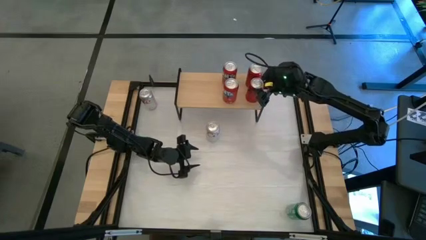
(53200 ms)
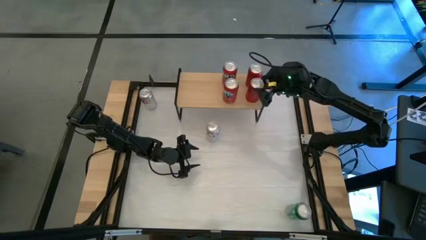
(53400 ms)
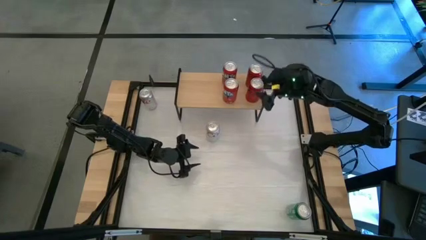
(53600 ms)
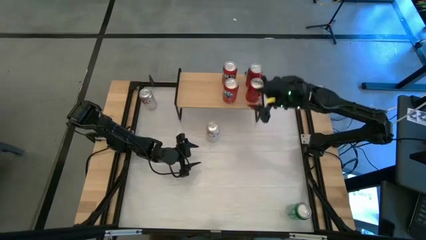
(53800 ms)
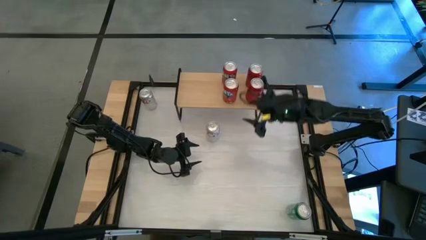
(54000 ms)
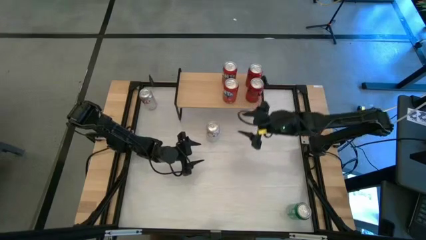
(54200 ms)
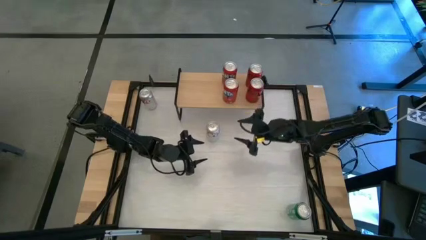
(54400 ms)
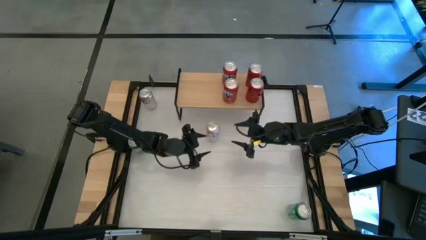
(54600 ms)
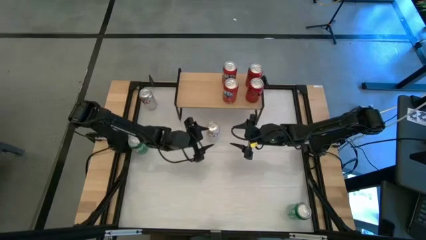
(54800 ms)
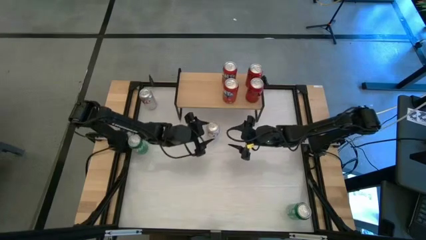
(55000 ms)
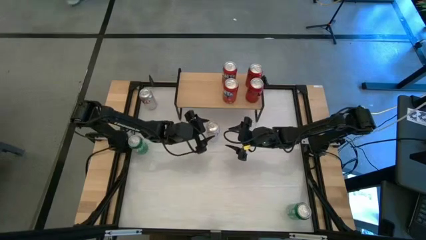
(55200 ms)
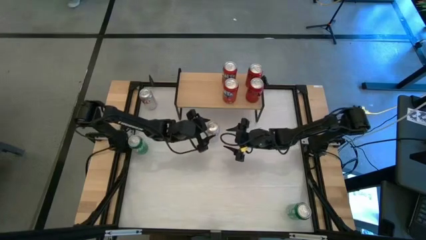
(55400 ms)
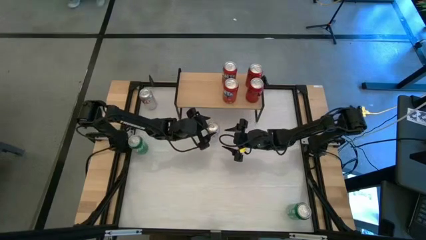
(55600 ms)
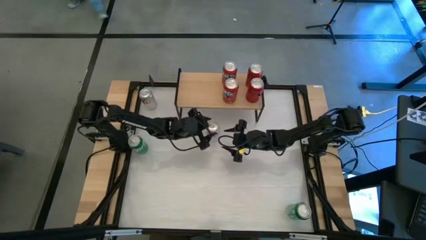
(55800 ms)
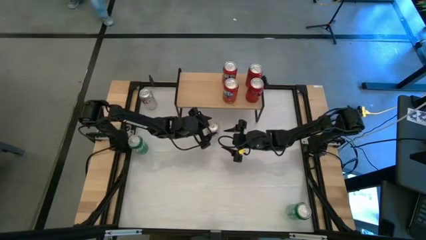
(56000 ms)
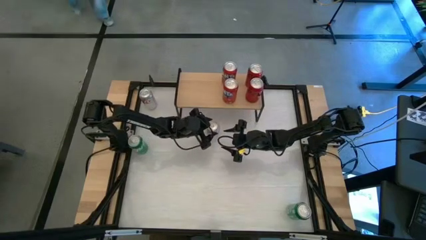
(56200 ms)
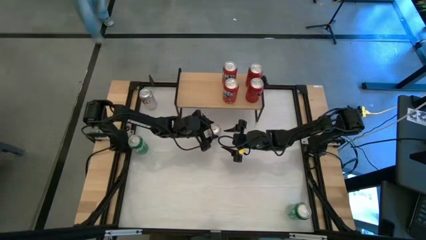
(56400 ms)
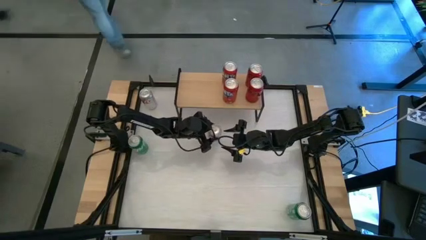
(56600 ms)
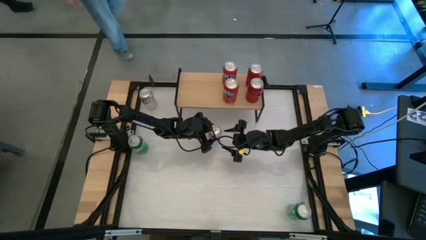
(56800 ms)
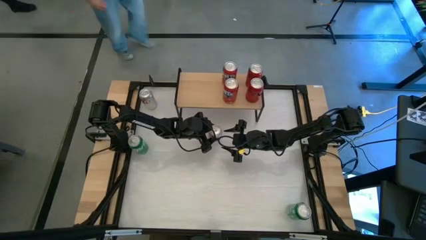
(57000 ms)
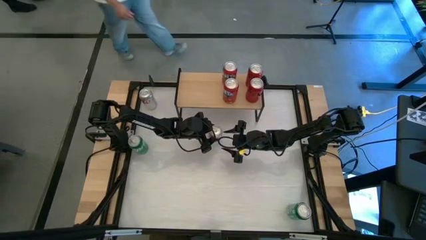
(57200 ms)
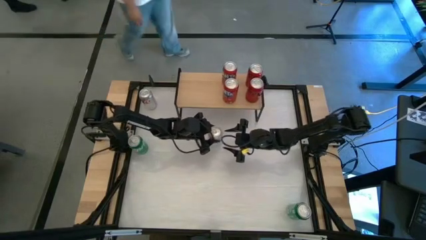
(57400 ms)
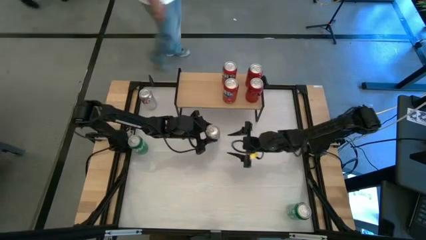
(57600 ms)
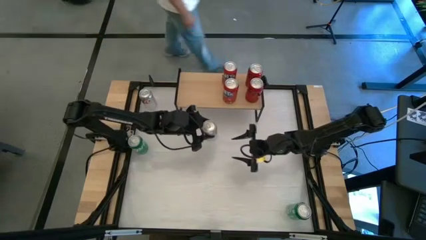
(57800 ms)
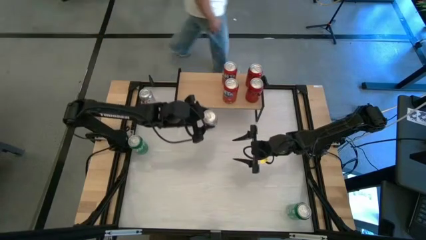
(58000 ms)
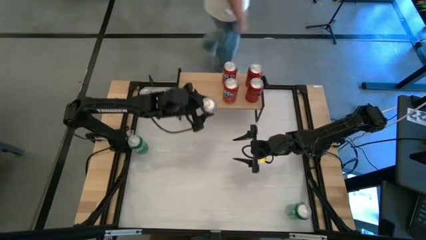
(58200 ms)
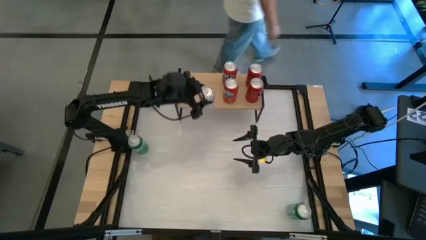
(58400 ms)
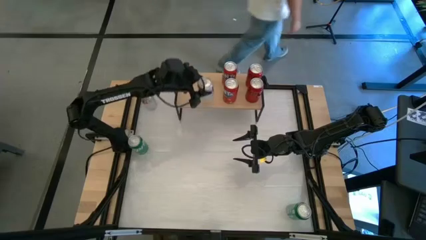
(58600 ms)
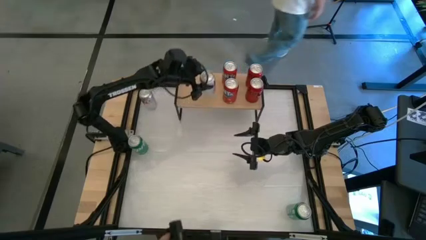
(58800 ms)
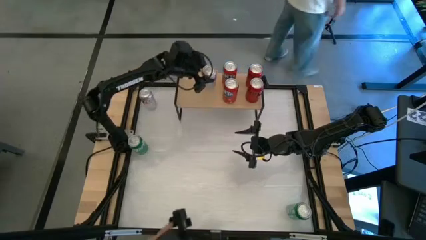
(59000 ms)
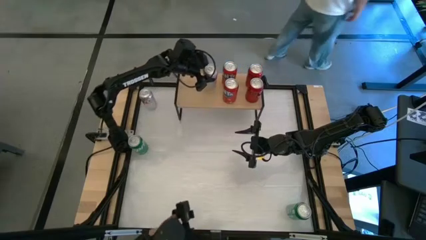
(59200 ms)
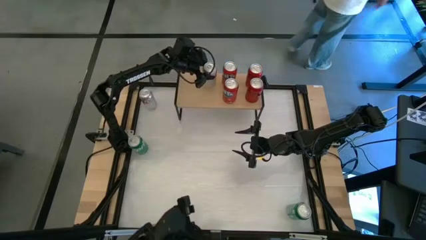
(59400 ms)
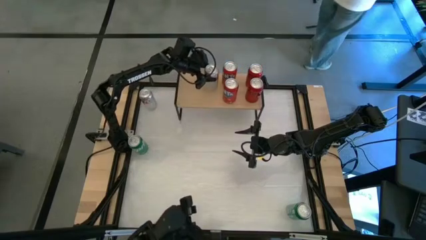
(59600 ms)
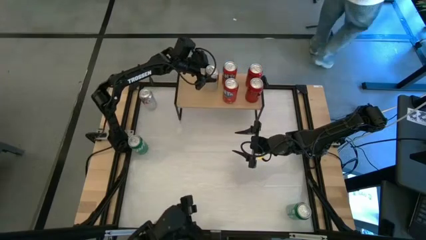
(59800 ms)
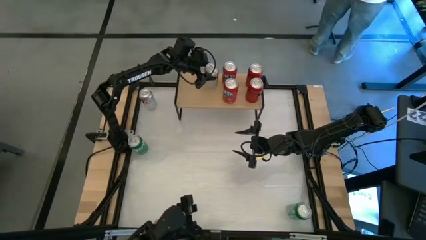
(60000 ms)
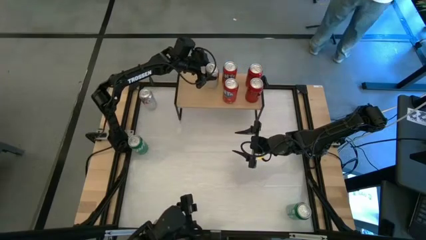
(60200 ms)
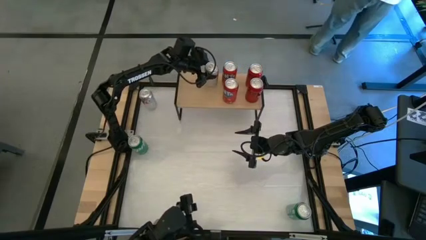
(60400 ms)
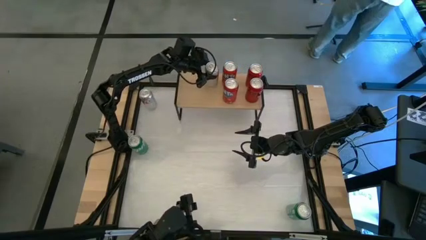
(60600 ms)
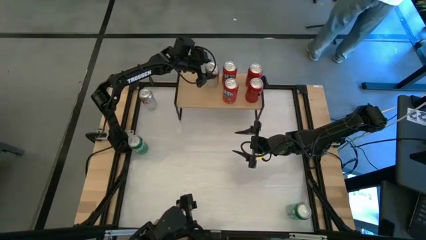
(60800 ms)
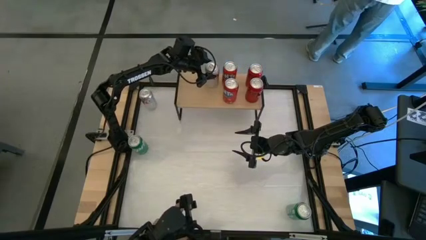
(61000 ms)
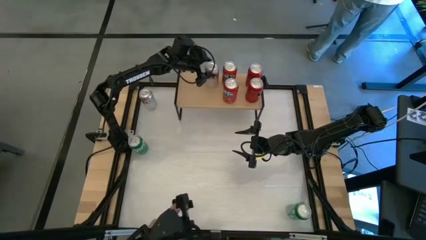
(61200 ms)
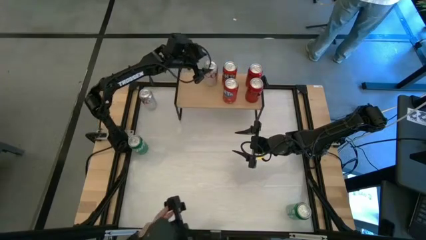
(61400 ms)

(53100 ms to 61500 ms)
Task: Place canned beverage on shelf
Put the bottom silver soda can on the shelf

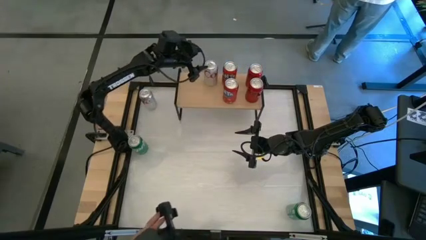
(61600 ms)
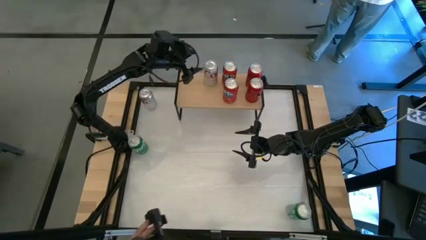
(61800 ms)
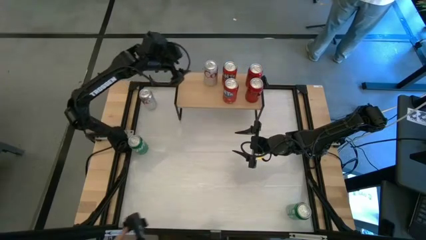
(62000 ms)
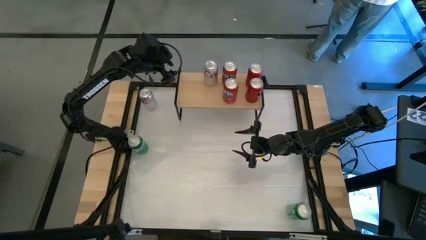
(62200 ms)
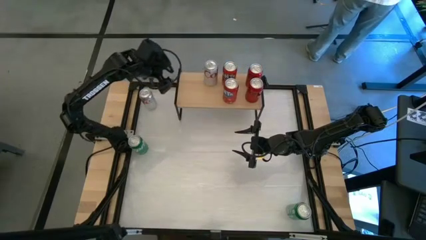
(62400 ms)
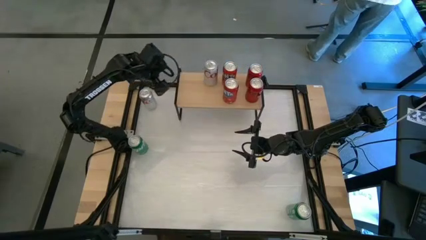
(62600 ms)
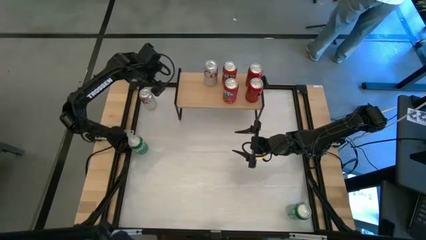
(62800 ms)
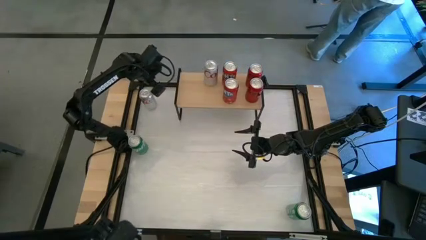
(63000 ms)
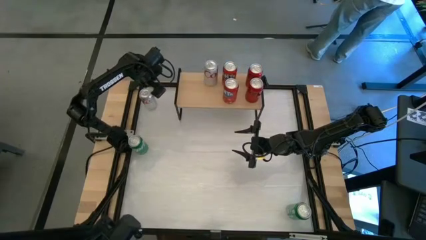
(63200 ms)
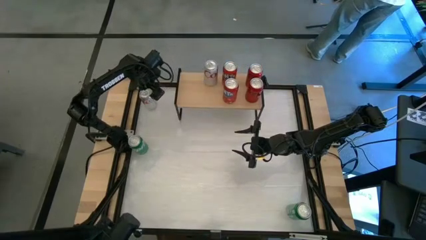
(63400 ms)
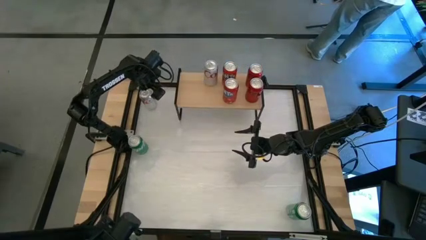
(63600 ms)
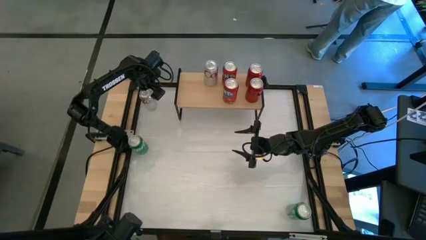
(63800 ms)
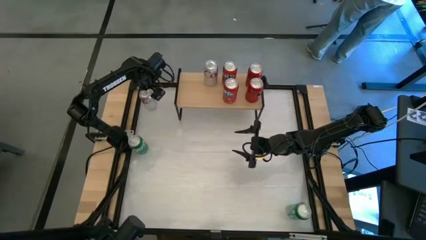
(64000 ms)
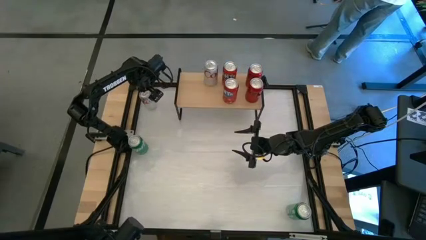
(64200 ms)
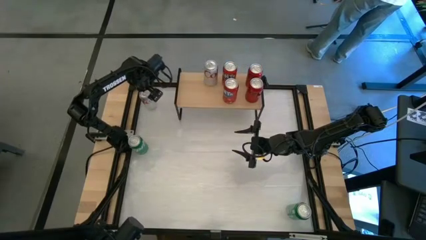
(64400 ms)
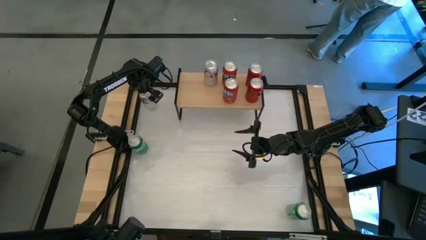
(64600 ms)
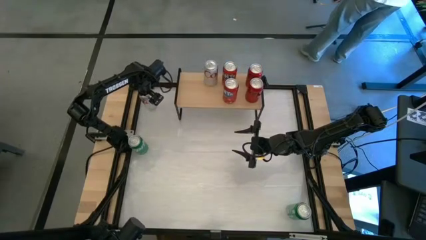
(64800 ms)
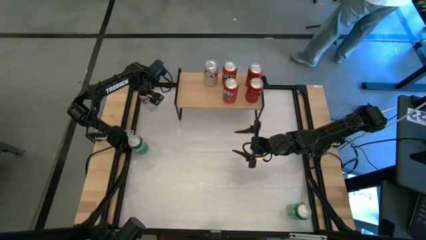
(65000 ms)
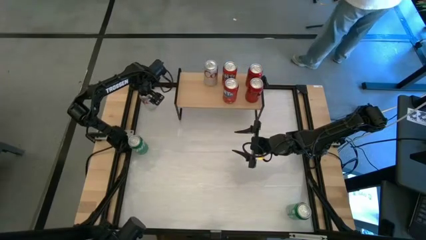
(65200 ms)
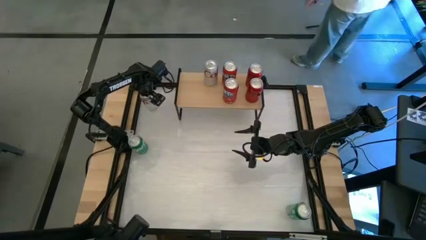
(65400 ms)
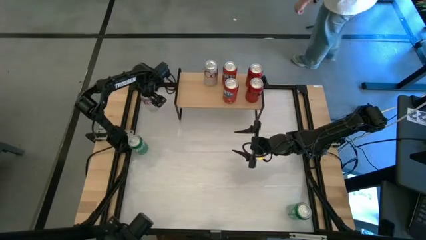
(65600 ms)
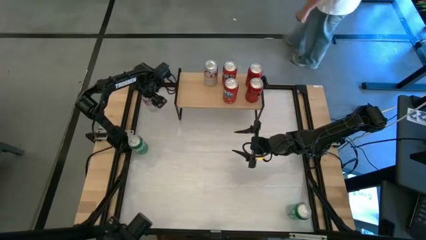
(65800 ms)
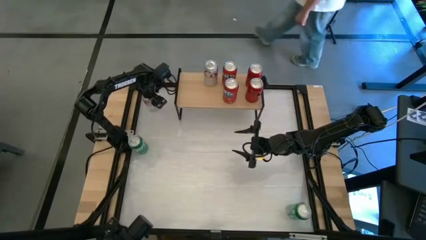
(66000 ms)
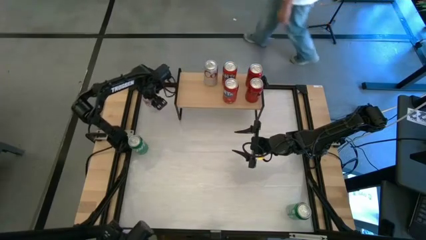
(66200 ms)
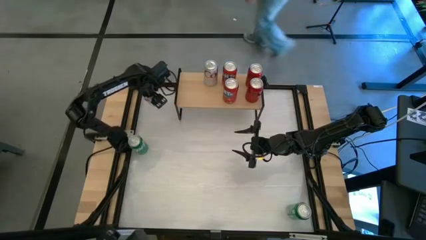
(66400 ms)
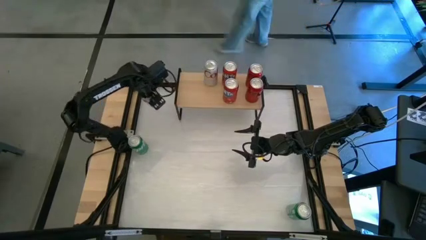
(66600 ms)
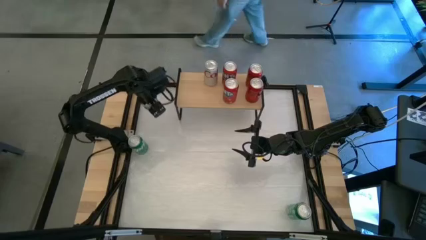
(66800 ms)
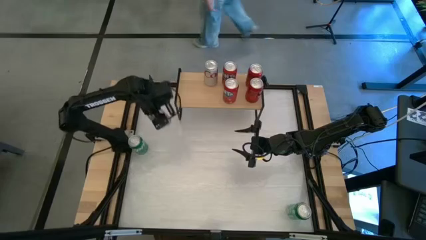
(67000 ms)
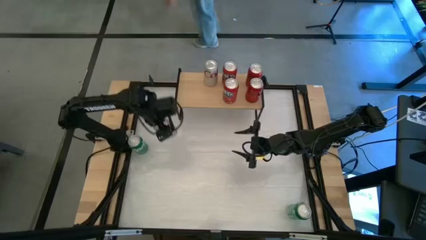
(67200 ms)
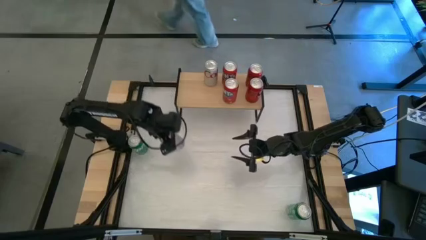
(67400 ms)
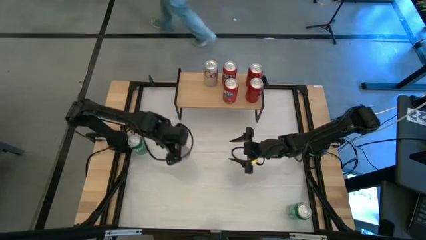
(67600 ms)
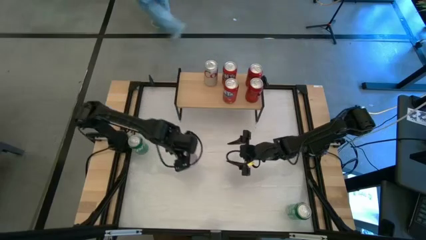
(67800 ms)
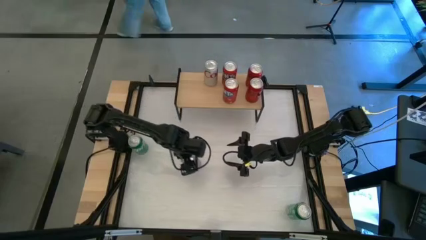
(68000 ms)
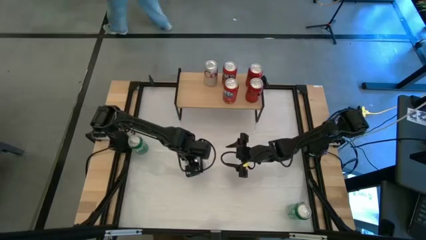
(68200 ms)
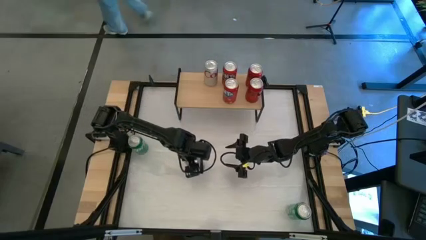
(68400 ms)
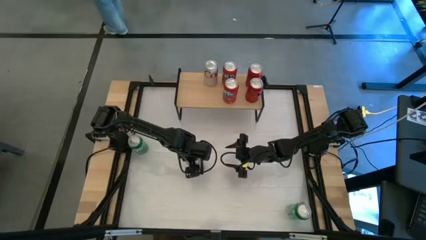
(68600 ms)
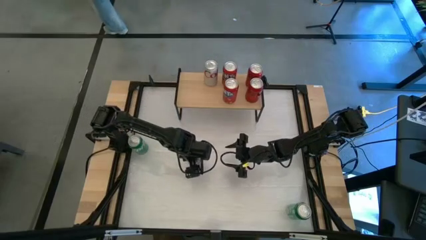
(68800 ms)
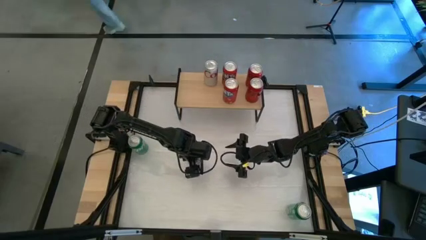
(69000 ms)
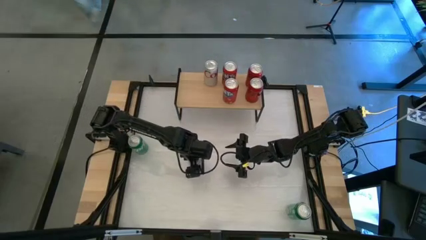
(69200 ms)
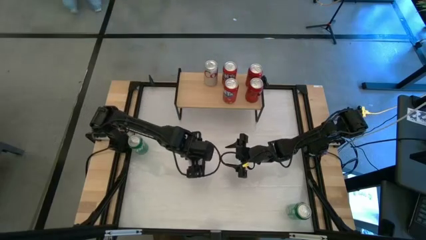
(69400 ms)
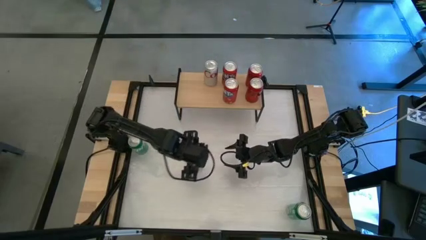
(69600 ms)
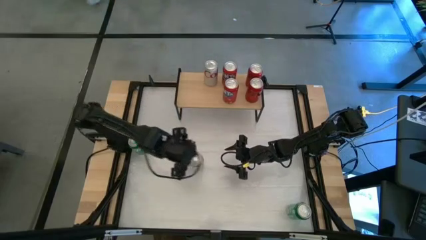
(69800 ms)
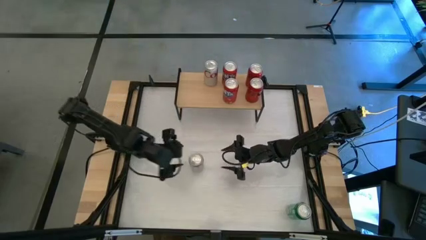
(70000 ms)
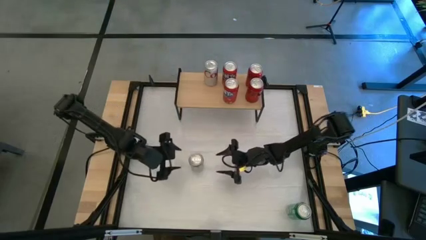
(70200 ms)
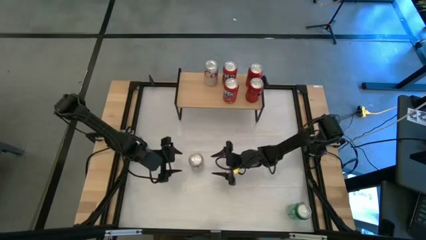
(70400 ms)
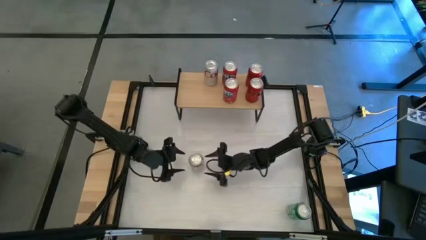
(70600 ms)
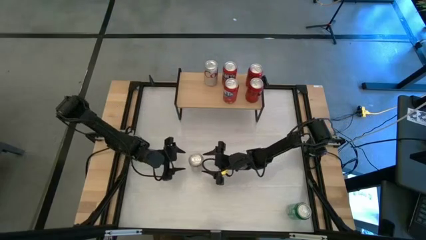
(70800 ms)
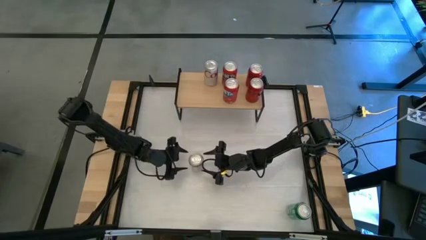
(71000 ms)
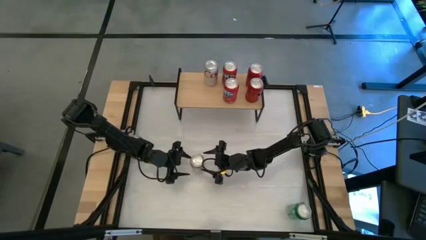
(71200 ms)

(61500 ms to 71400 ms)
Put the silver soda can on the shelf and align with the other silver soda can
